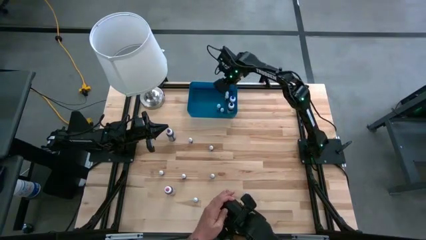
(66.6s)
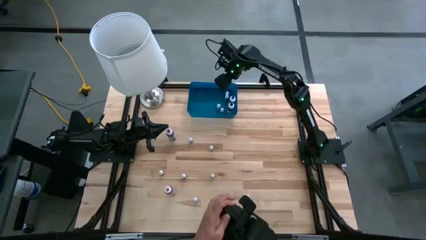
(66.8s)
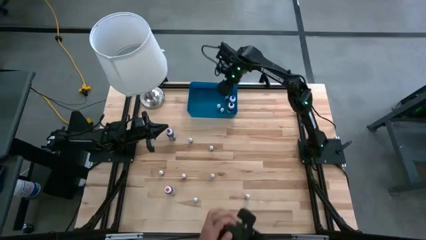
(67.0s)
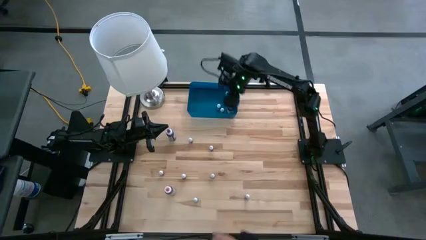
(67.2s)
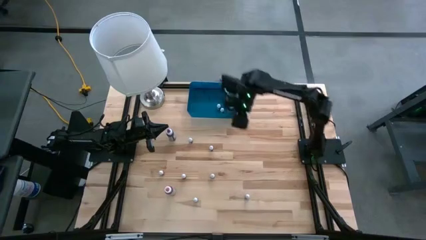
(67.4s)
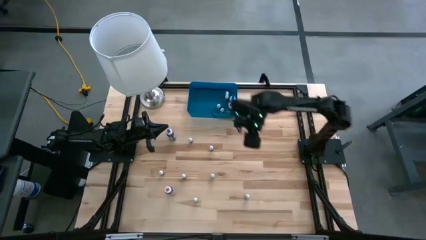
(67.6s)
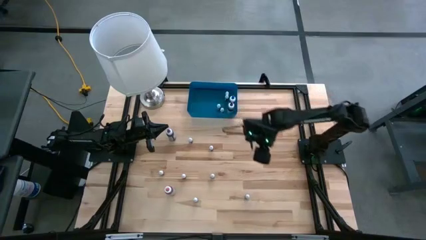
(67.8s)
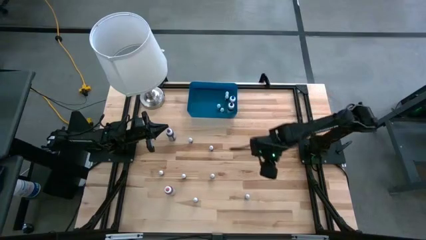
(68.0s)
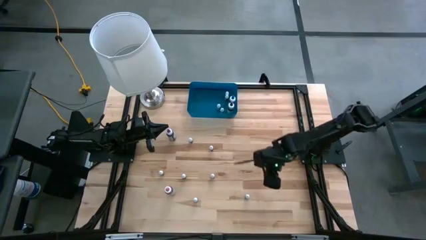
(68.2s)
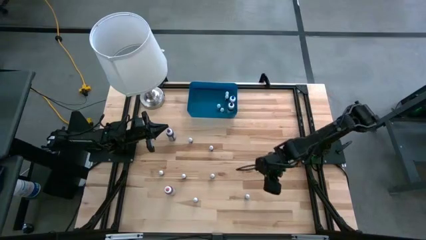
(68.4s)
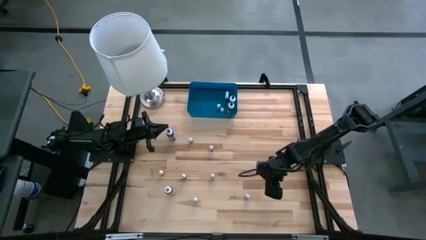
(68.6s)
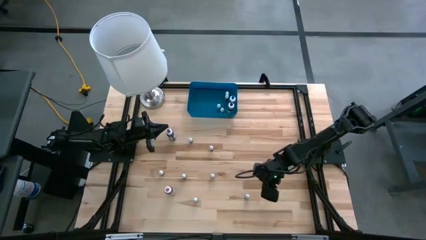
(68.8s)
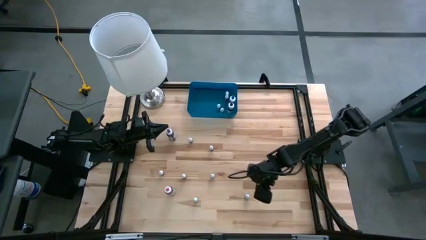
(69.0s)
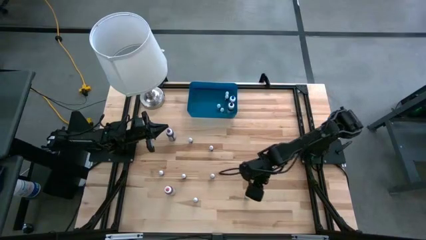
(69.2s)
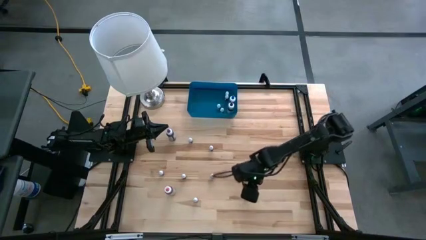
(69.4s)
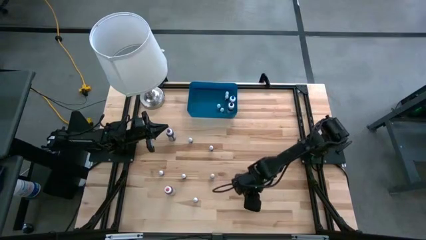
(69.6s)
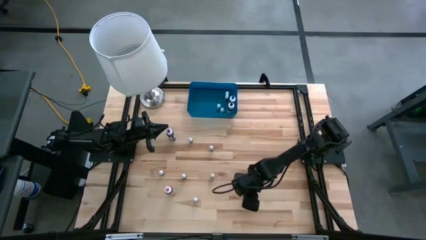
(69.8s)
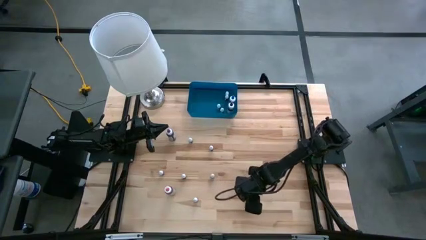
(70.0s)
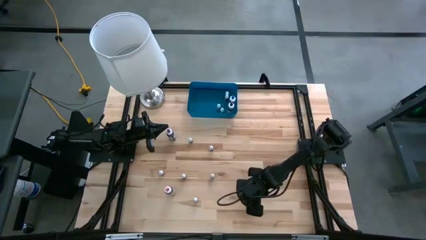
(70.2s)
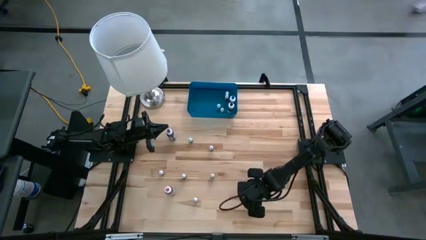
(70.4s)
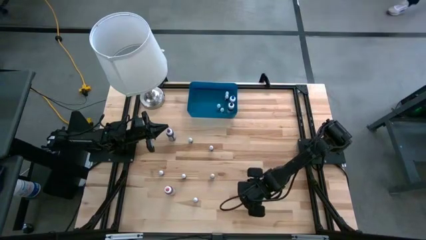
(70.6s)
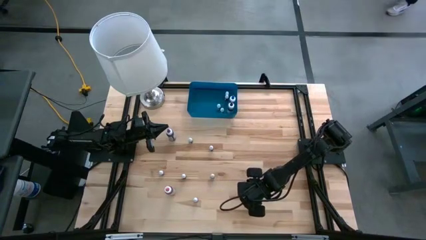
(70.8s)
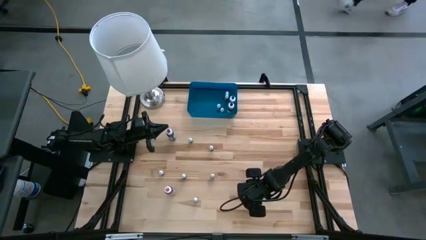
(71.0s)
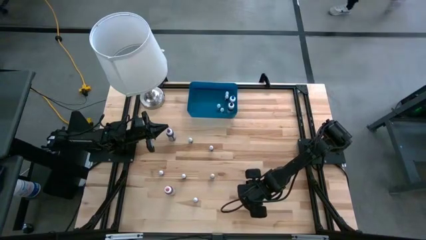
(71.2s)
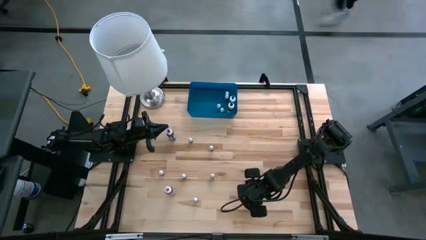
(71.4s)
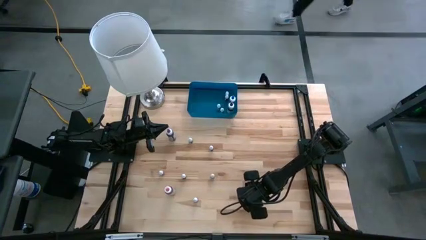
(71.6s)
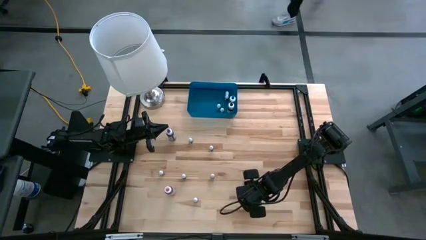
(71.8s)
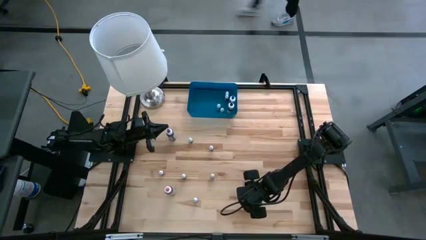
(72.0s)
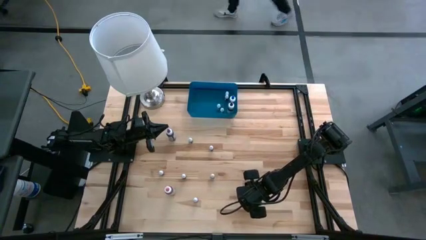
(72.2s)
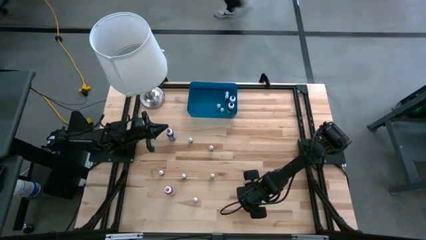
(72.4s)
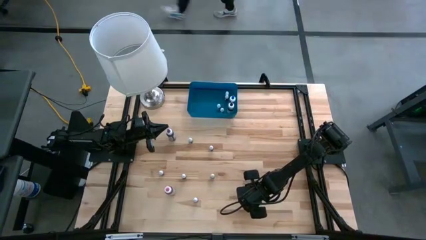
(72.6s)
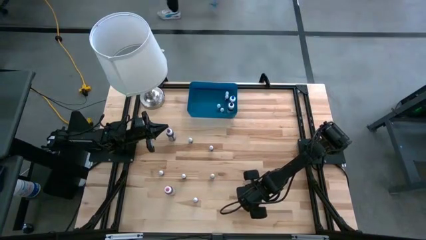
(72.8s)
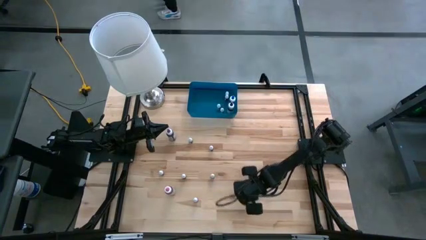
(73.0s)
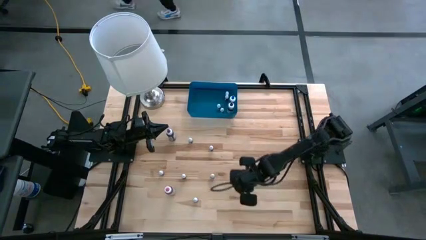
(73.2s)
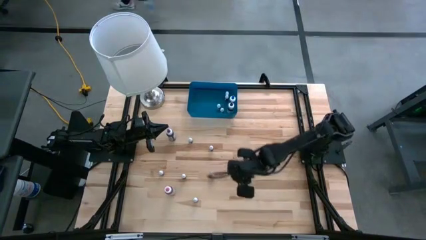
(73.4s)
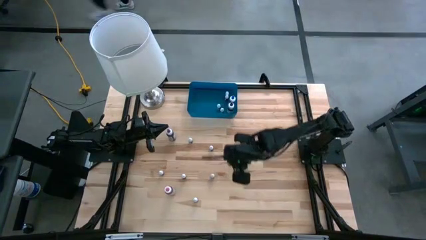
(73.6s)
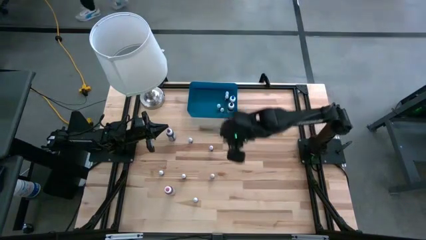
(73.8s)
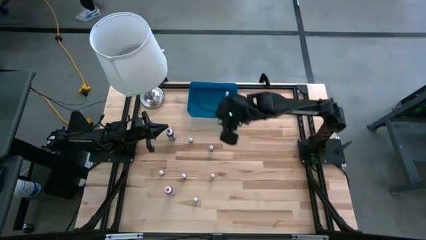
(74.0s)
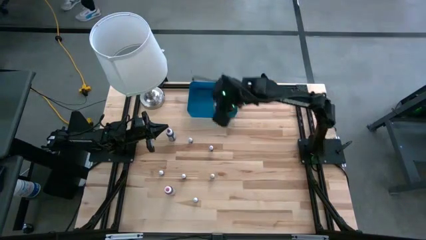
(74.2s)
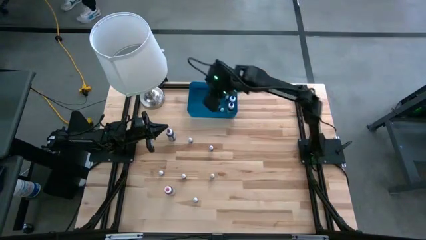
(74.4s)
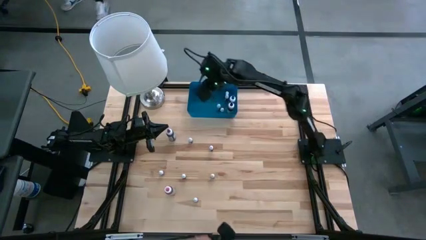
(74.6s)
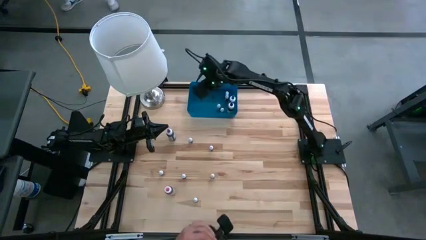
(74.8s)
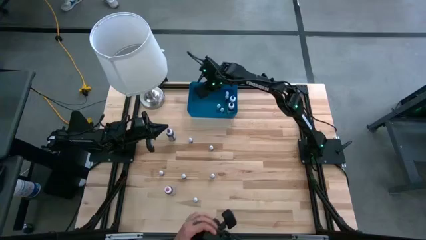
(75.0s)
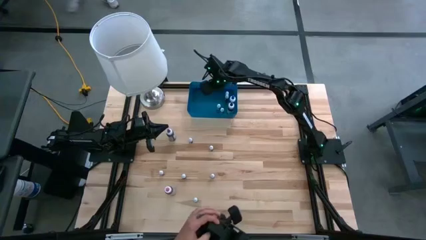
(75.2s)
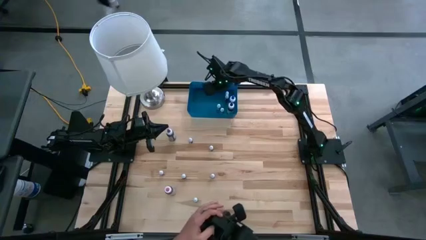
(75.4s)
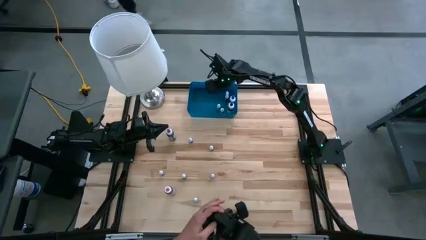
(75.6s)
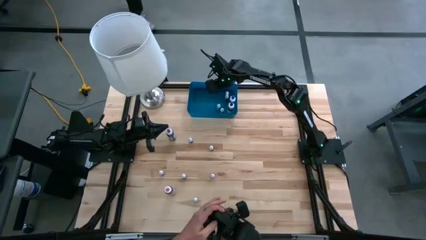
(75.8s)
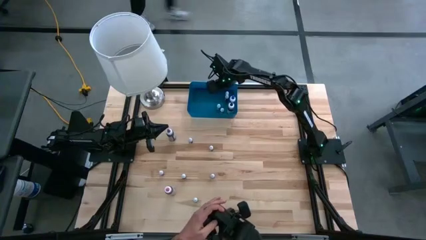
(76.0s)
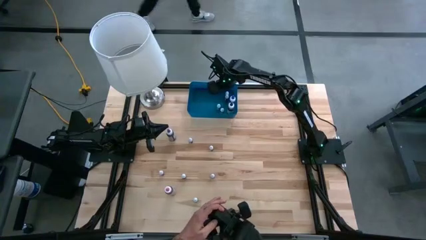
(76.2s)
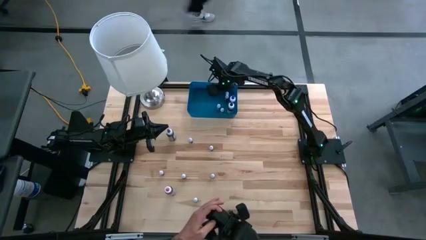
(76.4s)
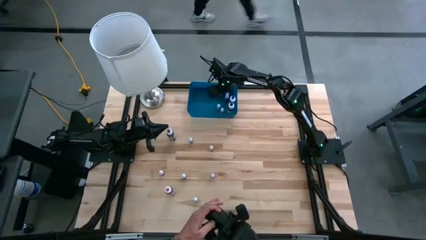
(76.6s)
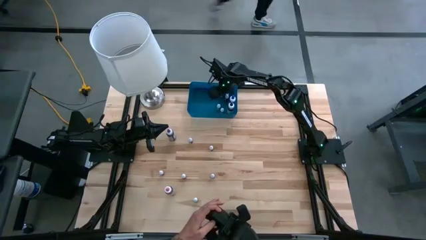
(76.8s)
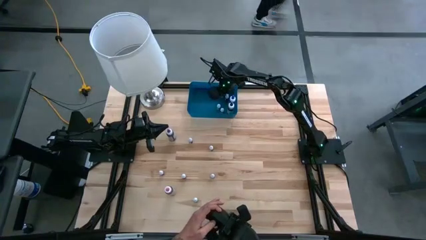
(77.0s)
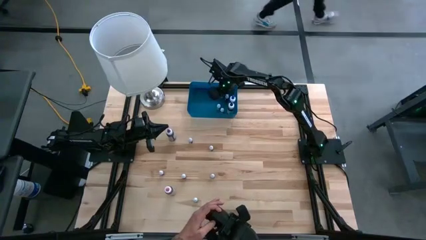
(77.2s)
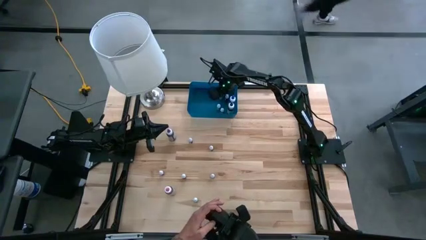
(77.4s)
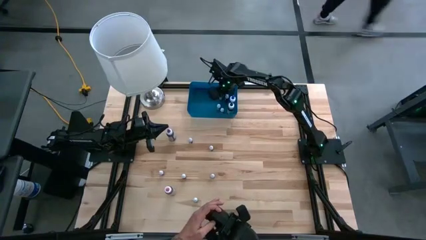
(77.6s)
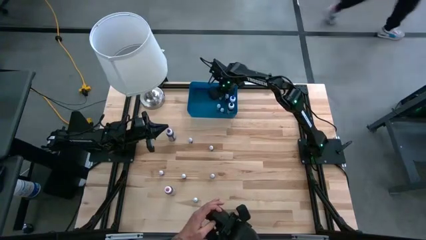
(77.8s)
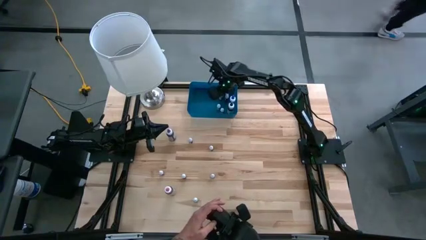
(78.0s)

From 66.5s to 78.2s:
Task: Pick & Place food coloring
Put the small green food coloring bottle into the blue bin

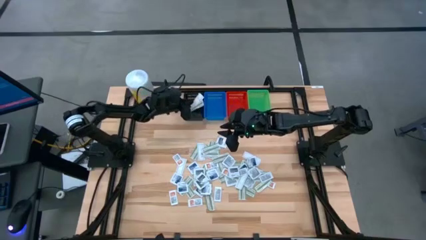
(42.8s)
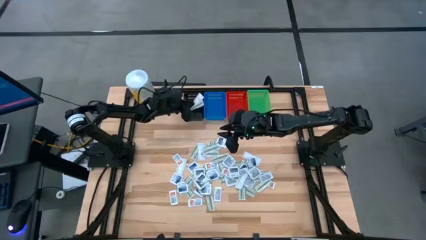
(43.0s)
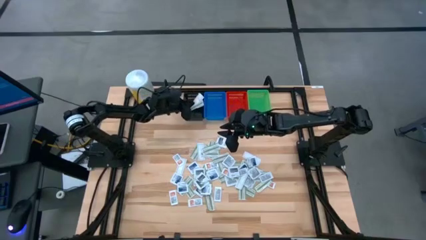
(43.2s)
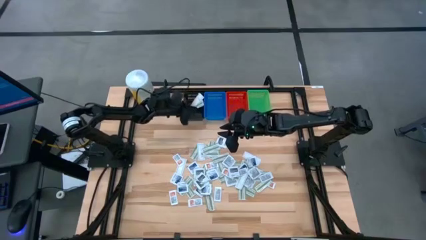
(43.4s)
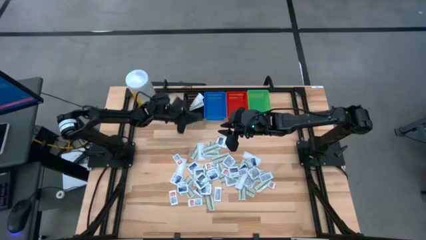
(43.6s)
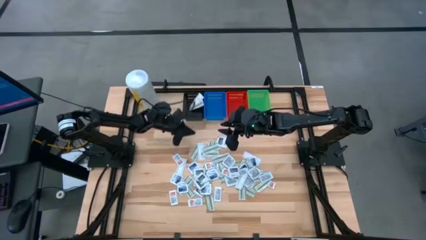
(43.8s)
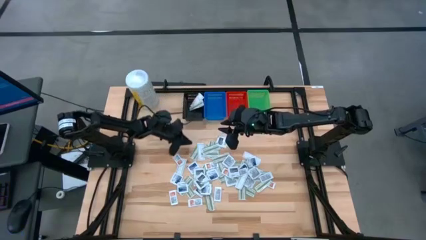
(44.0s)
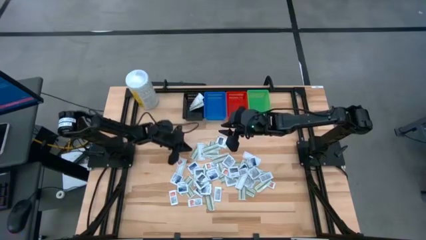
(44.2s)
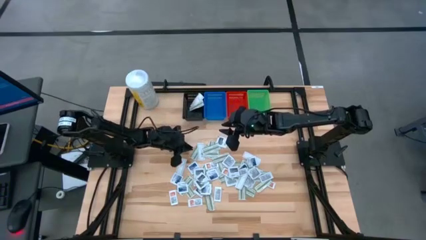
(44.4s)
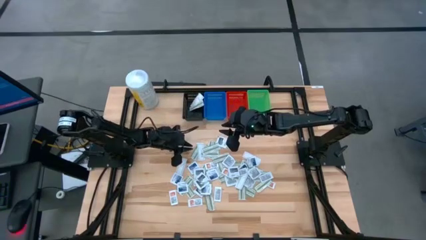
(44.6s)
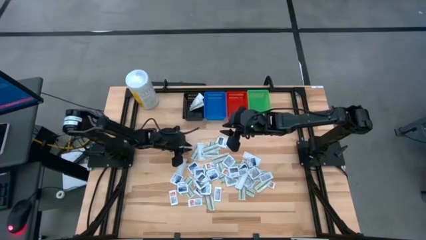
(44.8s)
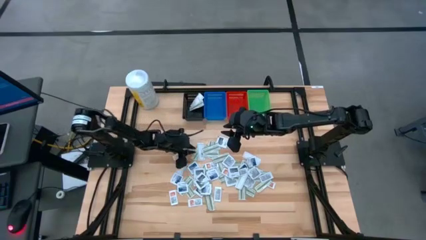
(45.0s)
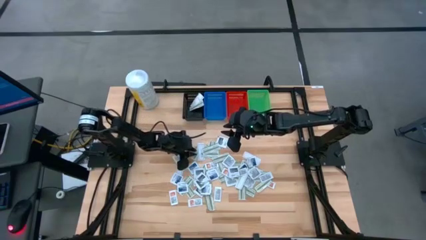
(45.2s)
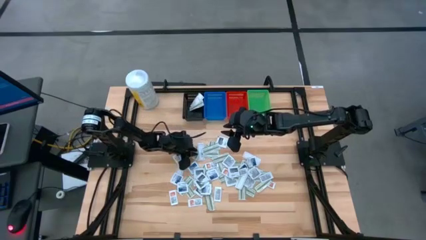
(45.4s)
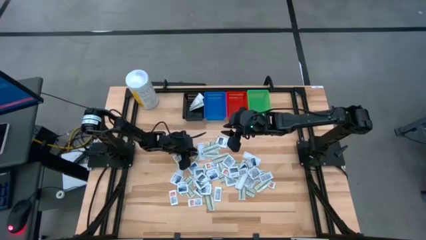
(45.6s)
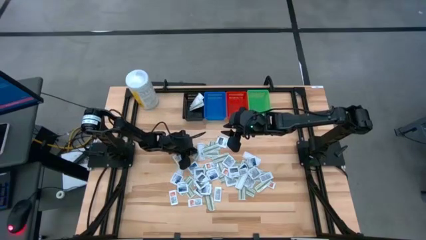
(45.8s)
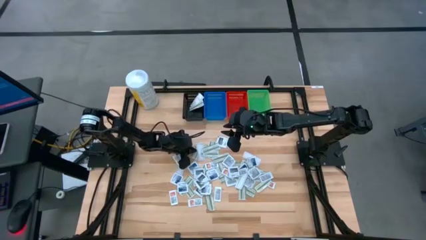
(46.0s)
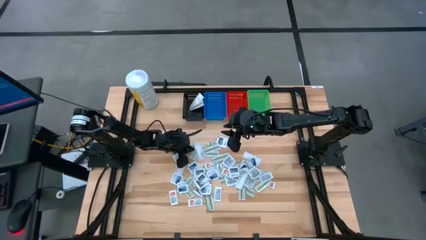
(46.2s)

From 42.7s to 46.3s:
Task: Pick & Place First Aid Supplies
Put the green bandage pack in the black bin
